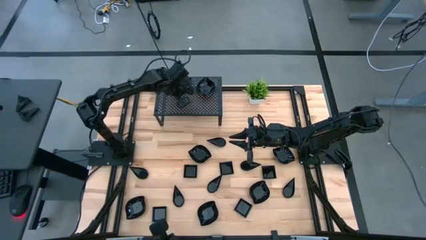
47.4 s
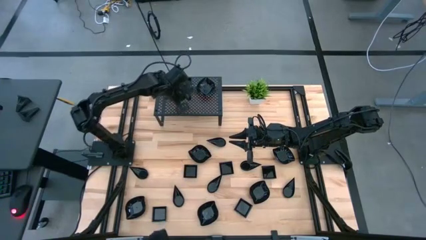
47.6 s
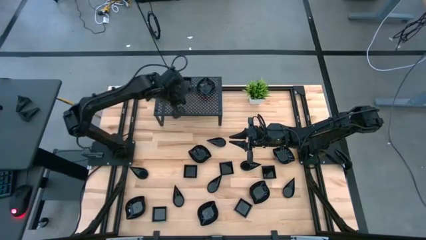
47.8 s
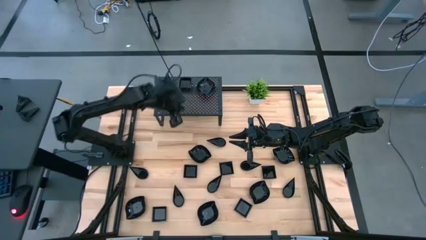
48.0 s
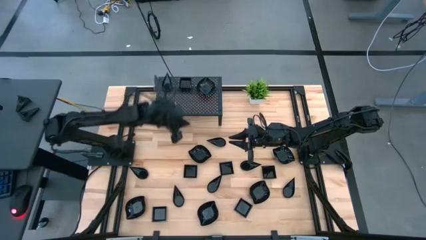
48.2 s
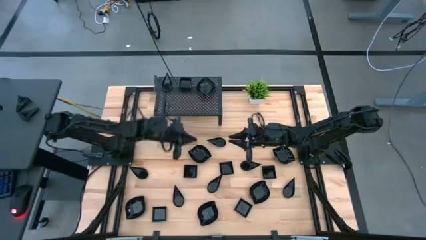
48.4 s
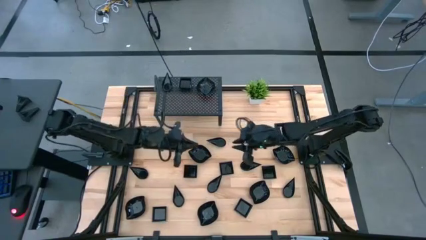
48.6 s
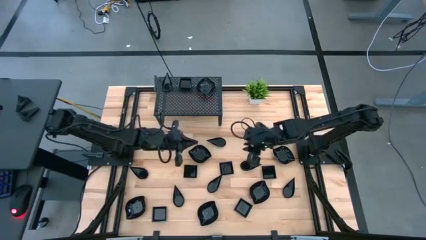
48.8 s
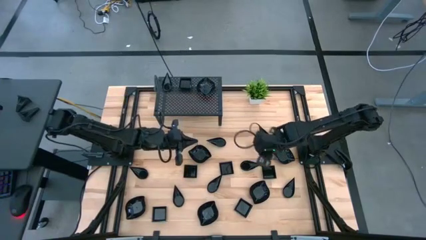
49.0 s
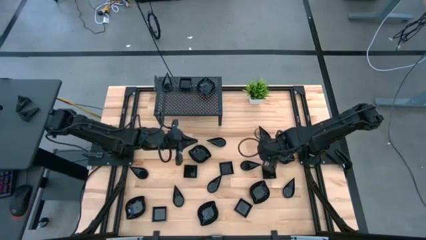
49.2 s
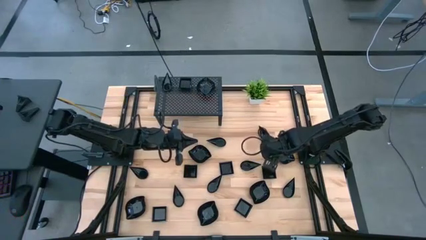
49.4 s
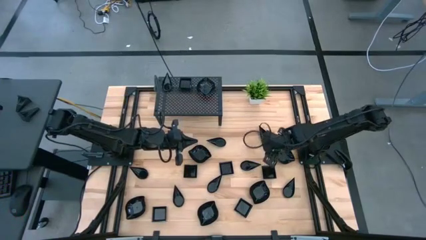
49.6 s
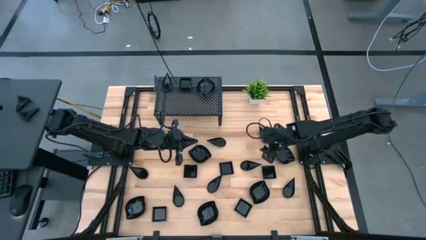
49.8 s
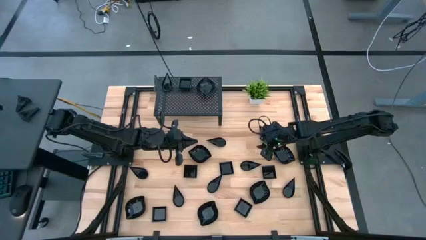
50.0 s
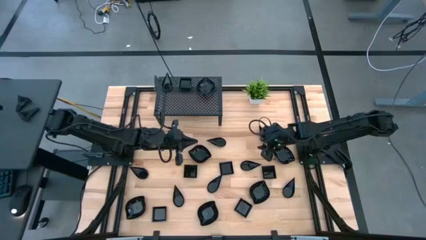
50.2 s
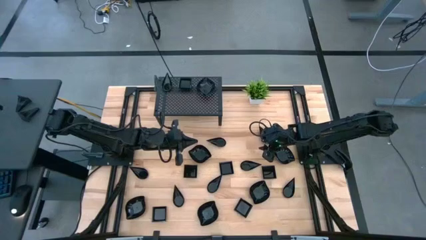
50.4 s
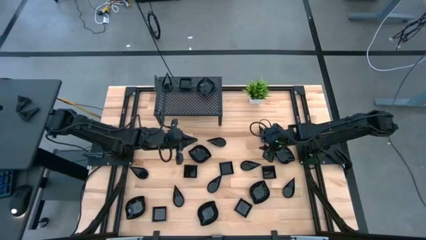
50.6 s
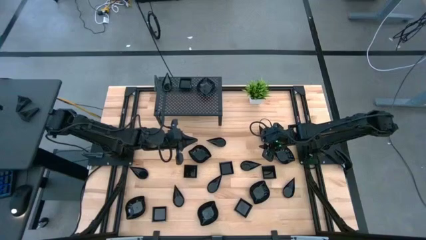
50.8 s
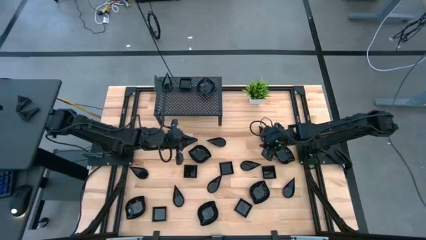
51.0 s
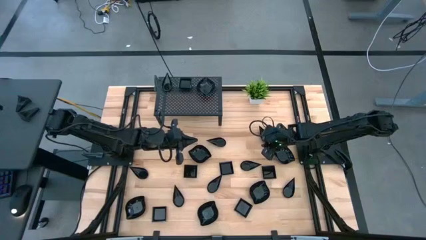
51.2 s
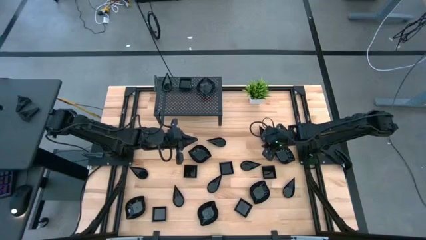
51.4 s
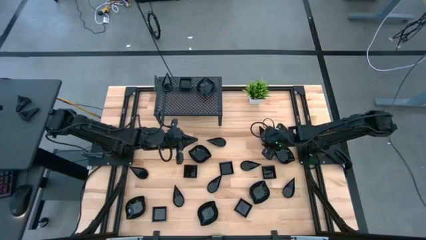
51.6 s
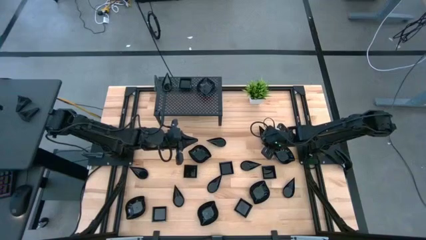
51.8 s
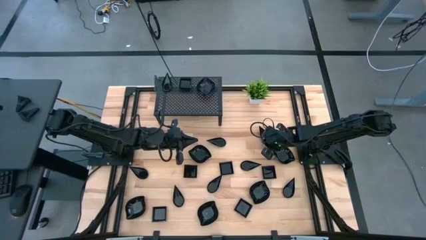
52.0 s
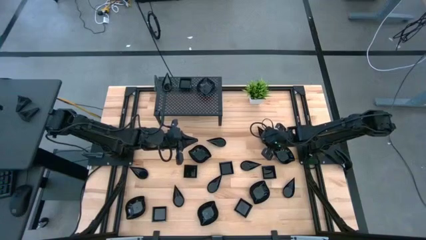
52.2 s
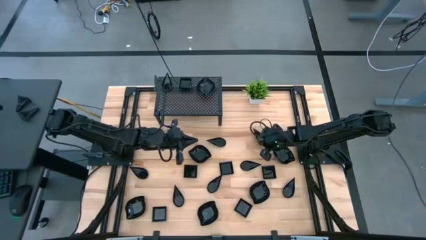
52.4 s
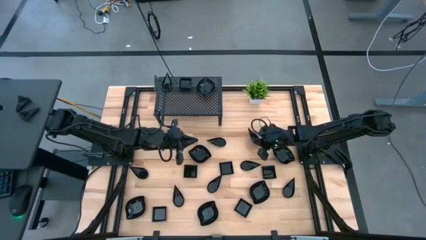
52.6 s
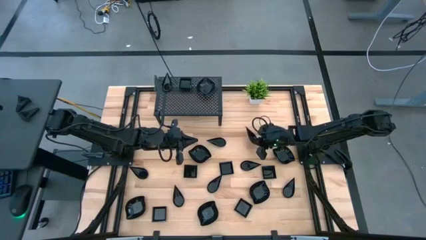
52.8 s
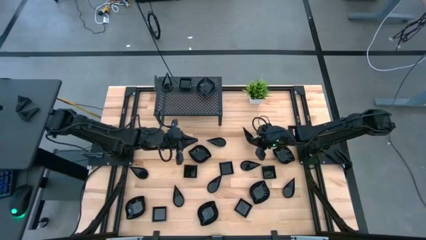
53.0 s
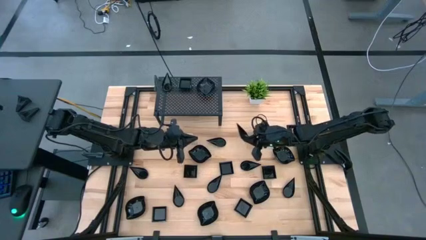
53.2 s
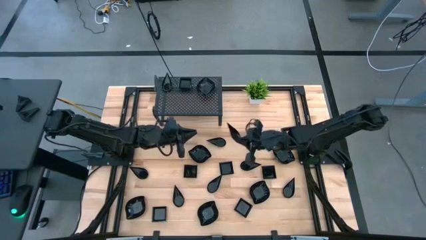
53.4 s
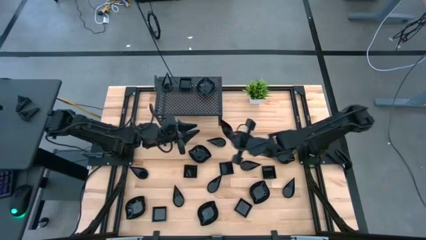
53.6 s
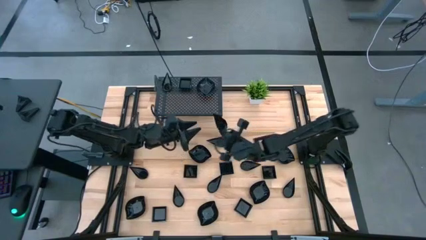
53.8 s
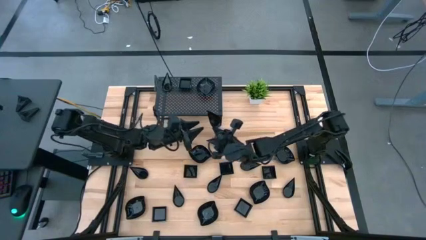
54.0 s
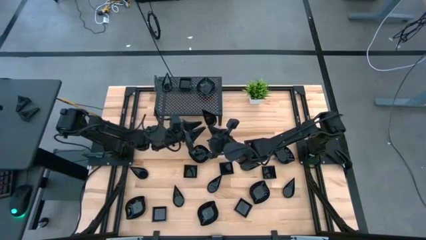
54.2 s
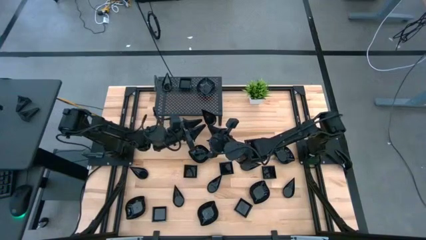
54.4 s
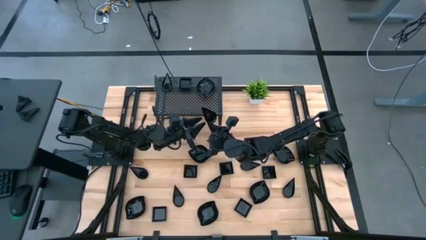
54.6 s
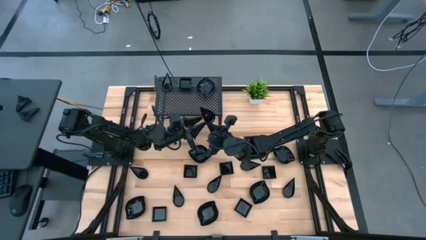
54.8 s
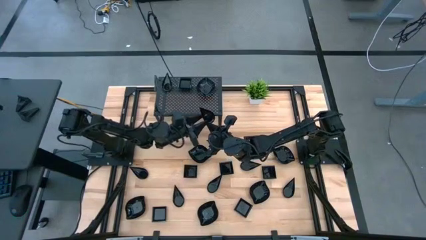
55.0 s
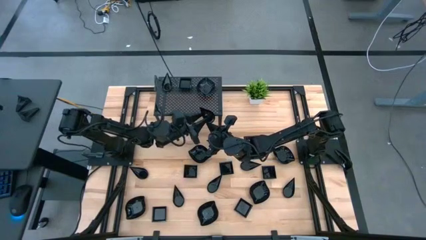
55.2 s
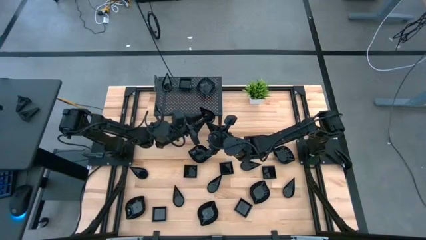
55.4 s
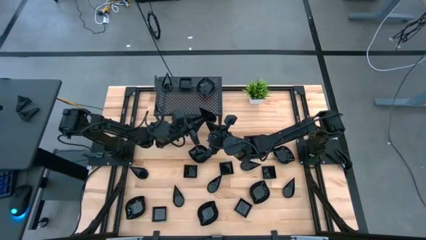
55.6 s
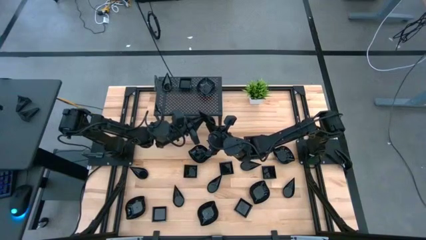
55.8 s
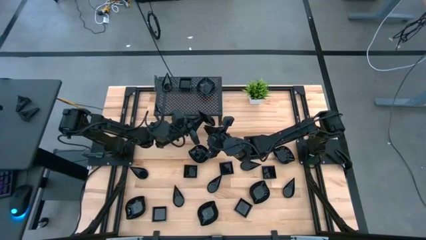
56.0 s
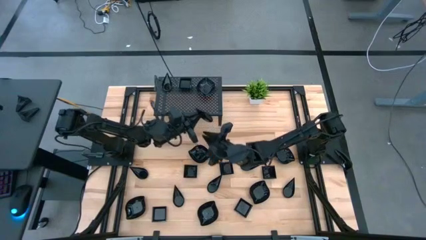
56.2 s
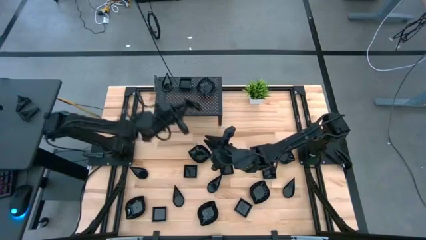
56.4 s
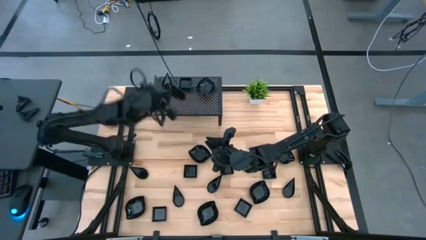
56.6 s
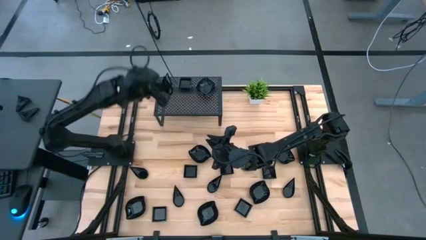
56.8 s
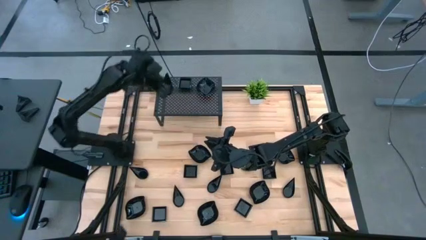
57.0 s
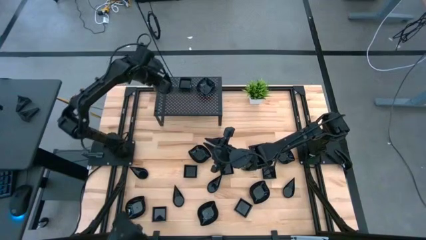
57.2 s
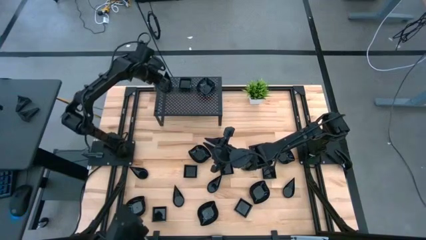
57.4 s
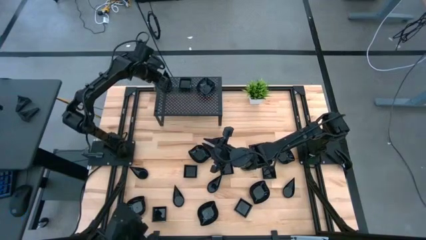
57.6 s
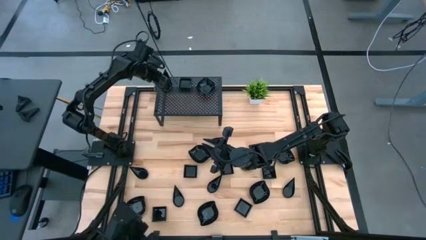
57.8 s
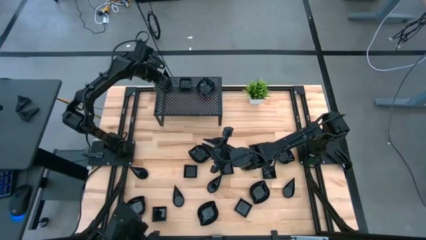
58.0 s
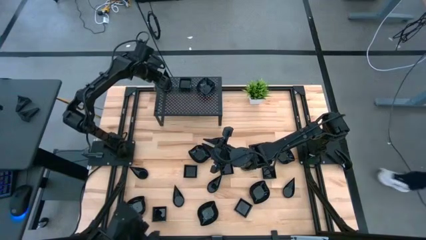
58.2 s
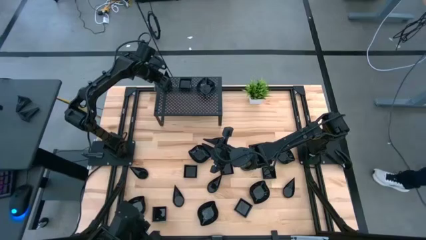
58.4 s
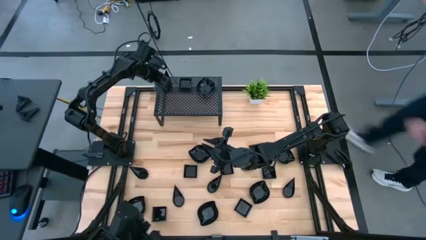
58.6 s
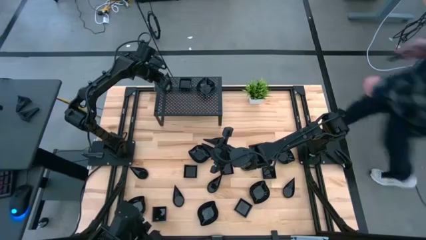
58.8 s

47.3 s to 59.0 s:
Task: Pick & Place Mini shaped plates
Stack the black drop-shaped plate on top of the drop-shaped plate on the shelf

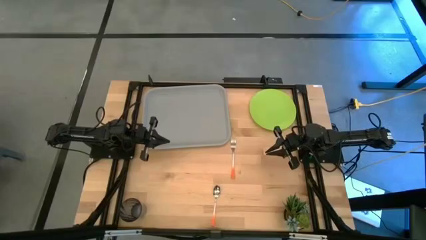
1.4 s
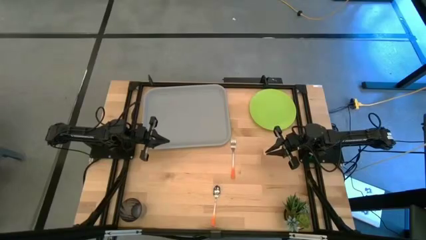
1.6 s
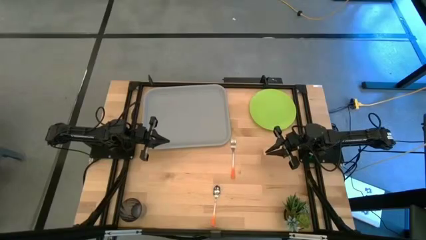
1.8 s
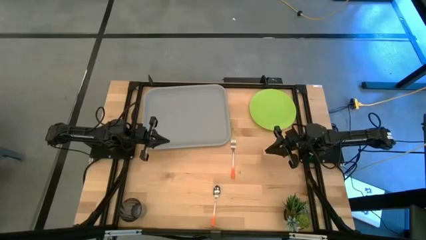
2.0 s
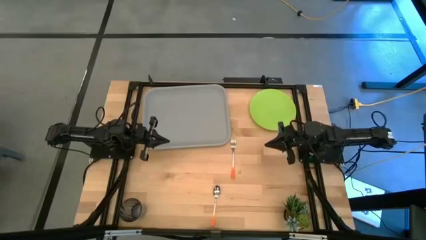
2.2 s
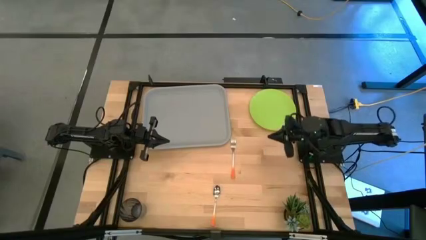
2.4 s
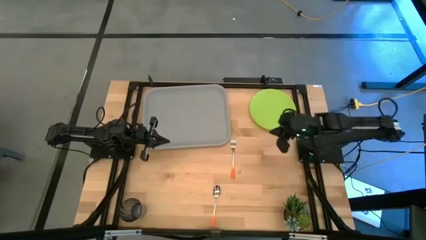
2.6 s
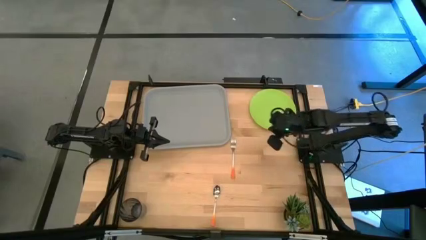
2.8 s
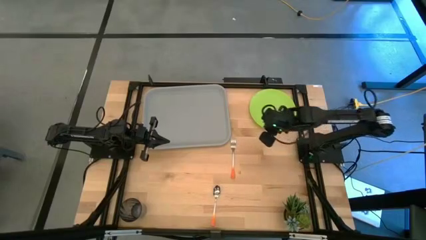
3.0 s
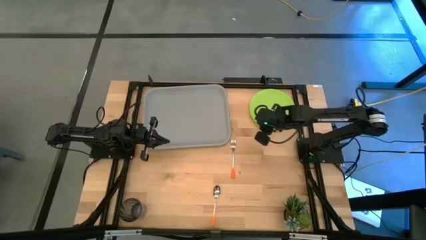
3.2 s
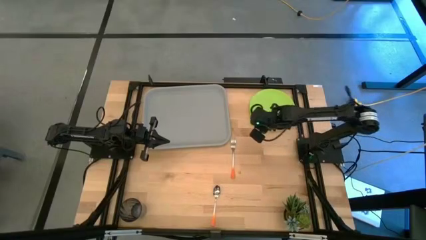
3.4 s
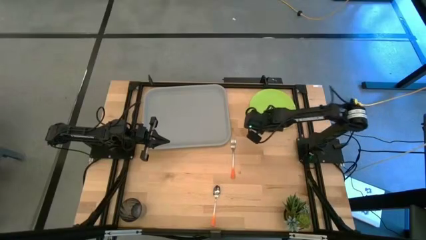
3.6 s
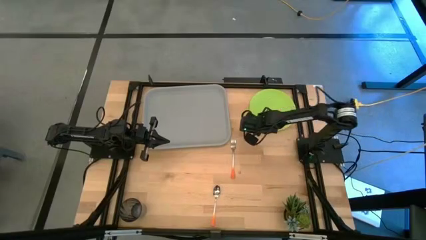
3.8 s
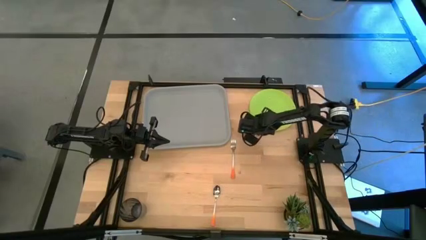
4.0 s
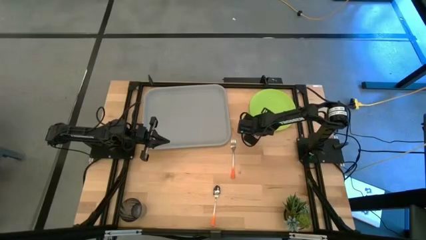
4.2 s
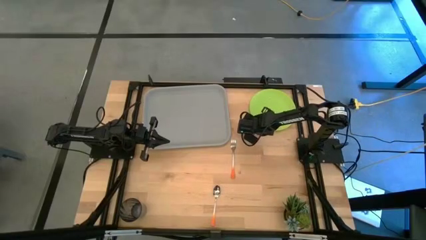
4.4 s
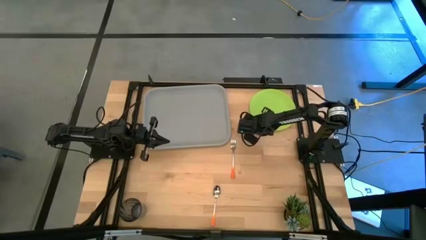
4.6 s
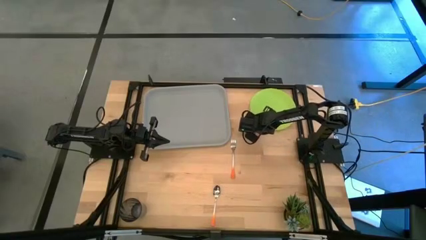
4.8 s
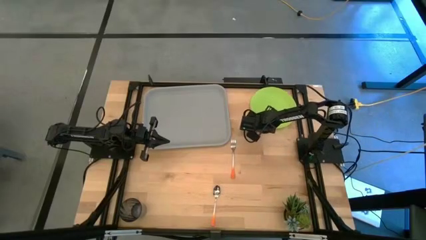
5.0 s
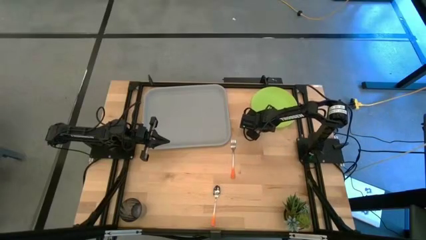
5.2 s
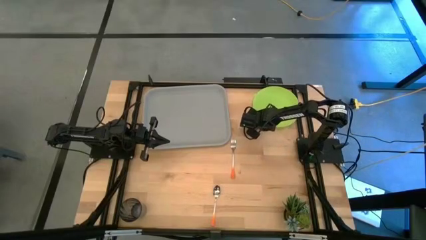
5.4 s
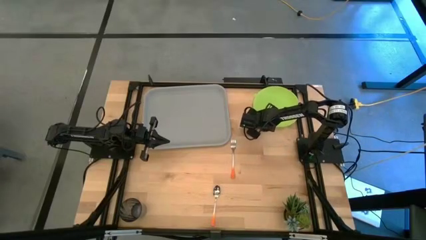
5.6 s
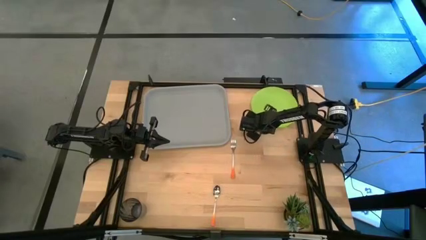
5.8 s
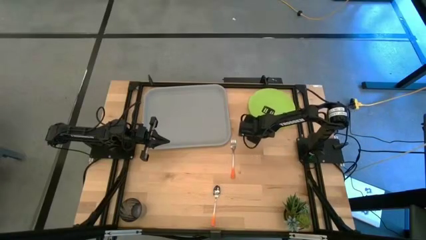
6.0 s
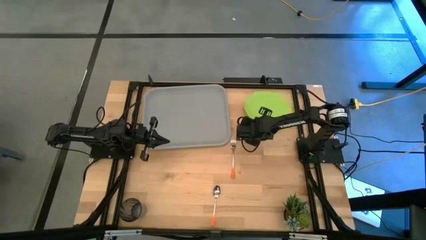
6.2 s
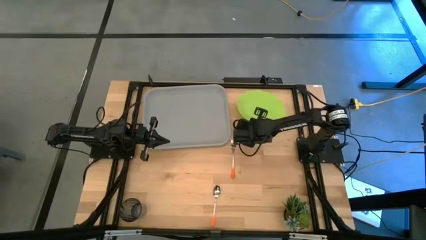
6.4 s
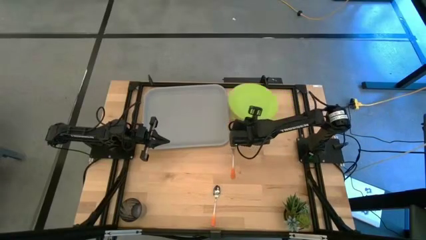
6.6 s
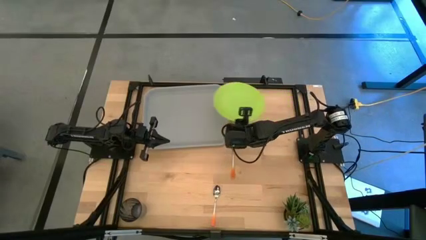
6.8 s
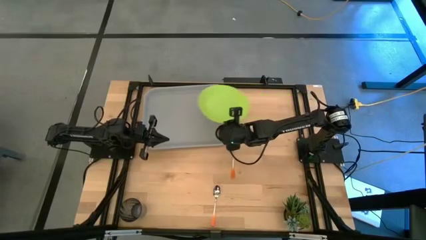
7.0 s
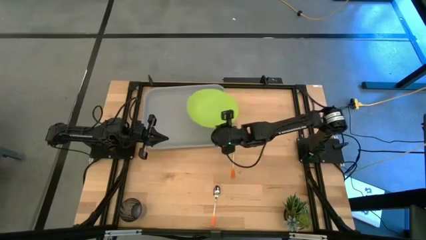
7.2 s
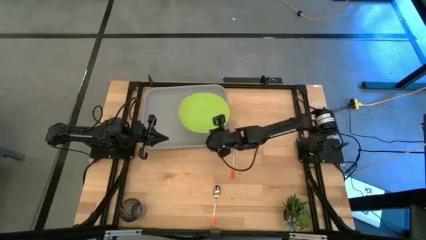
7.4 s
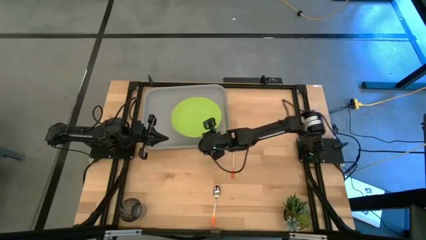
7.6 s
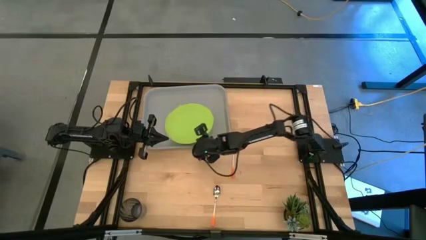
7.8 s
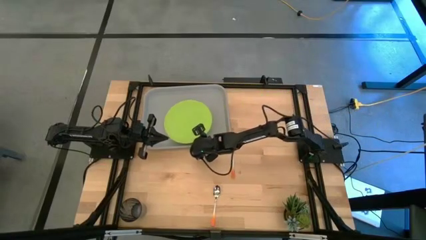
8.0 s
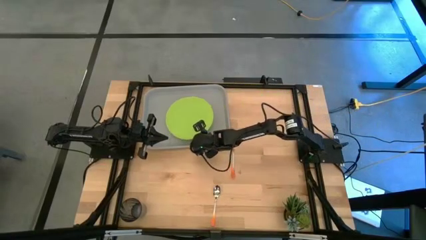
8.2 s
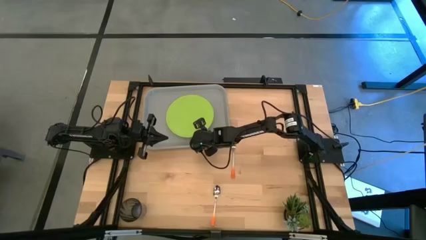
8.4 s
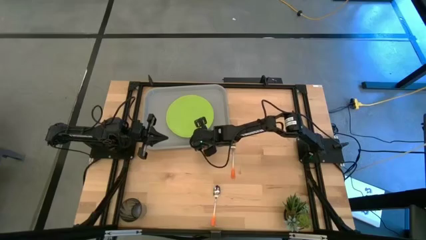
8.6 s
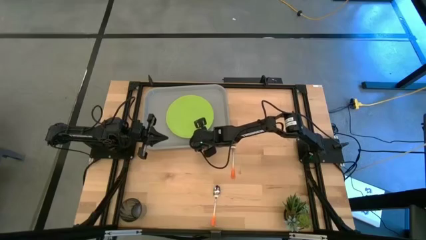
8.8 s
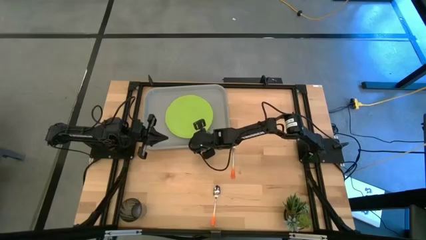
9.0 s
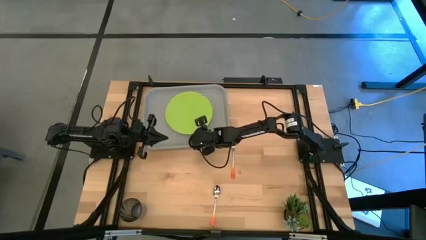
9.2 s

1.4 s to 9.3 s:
Task: Pick and place plate/cup/fork/spoon on tray
Put the green plate on the gray tray
